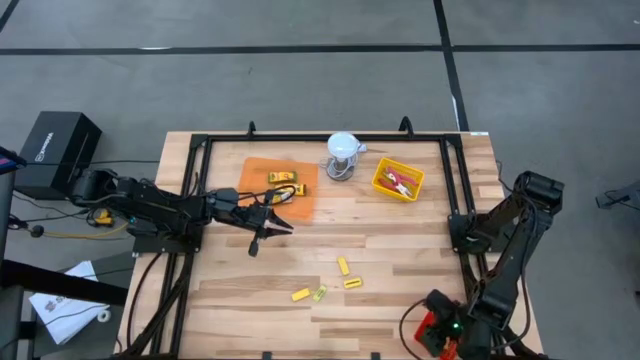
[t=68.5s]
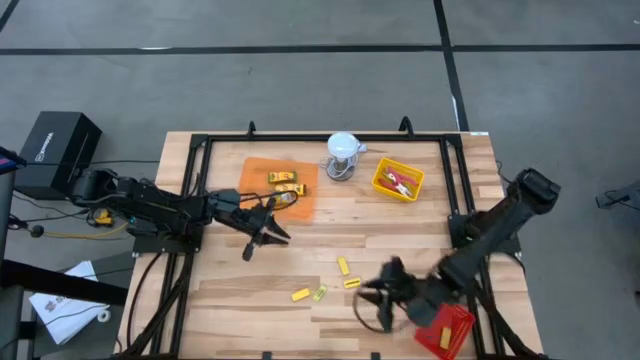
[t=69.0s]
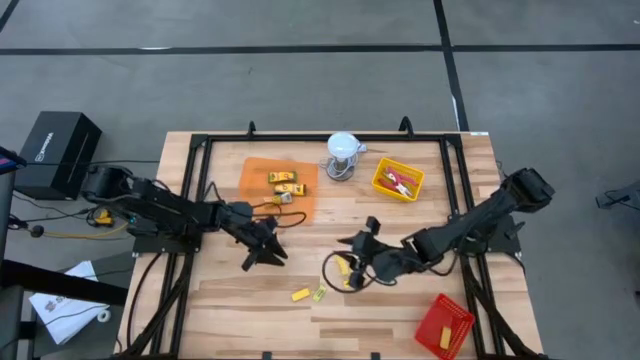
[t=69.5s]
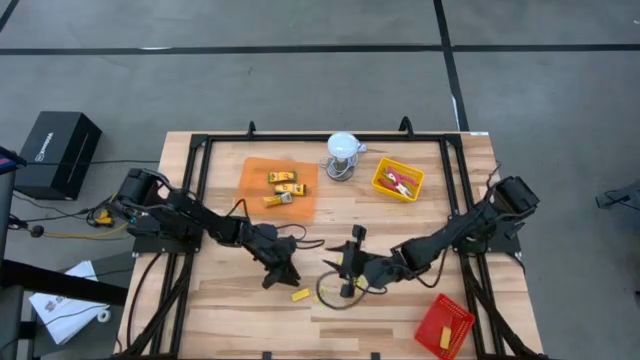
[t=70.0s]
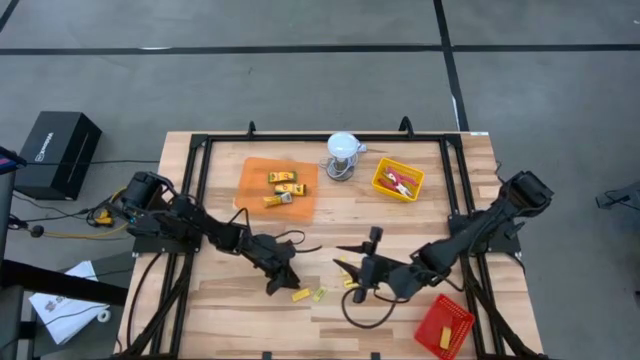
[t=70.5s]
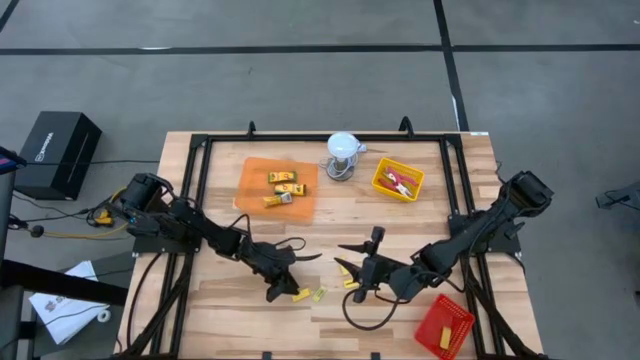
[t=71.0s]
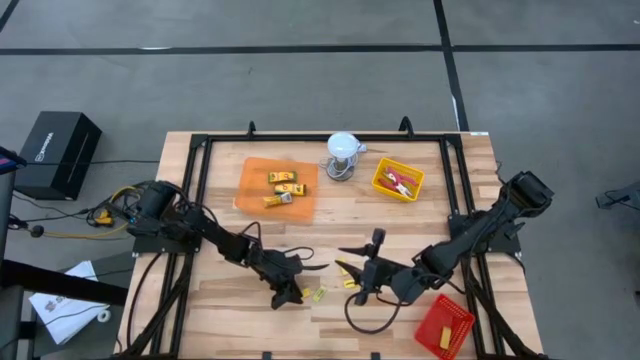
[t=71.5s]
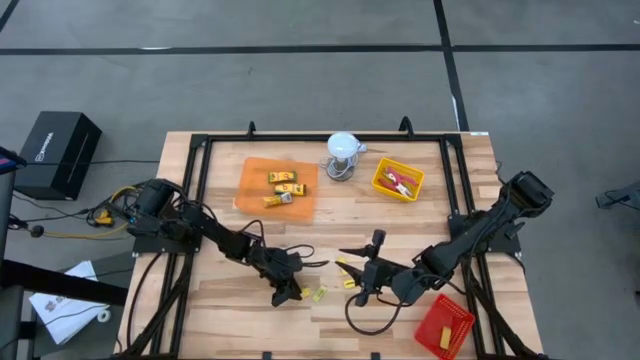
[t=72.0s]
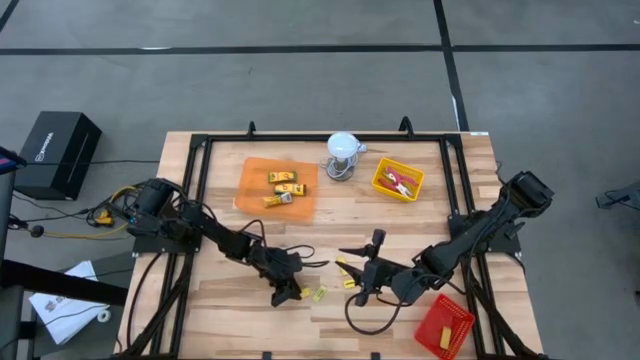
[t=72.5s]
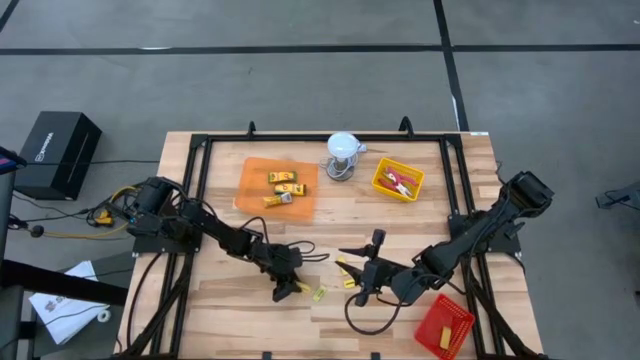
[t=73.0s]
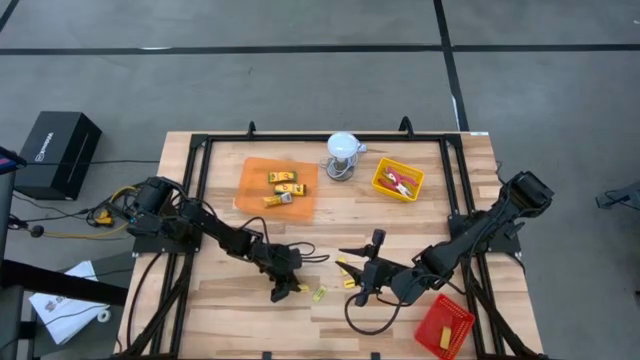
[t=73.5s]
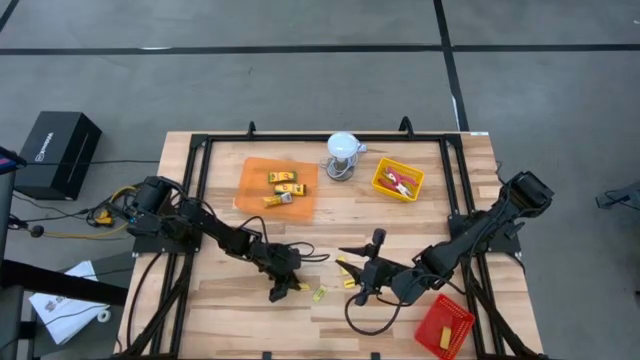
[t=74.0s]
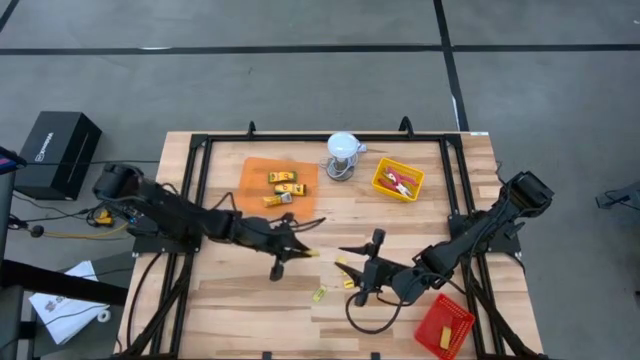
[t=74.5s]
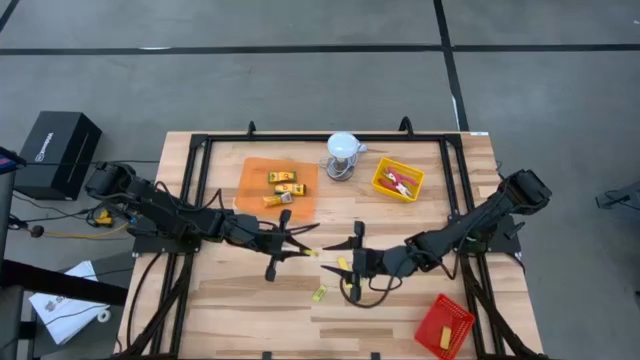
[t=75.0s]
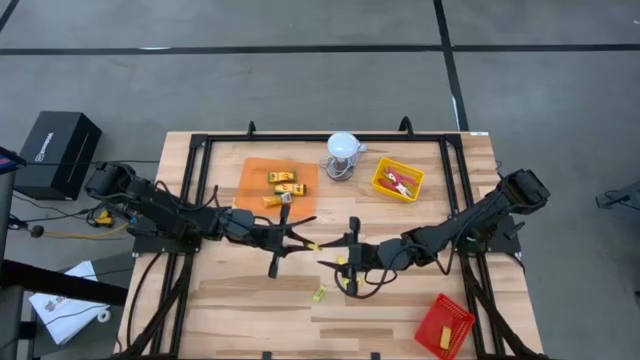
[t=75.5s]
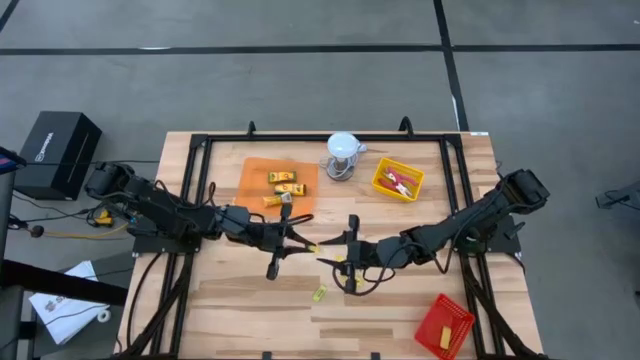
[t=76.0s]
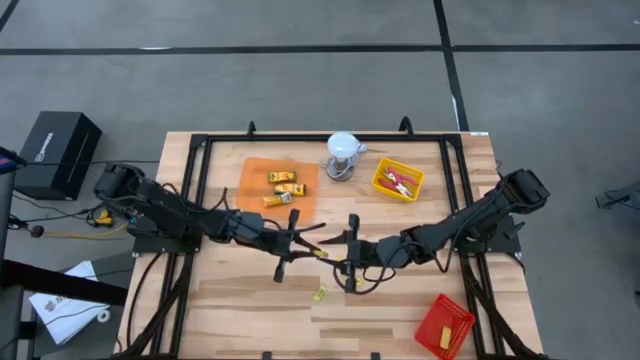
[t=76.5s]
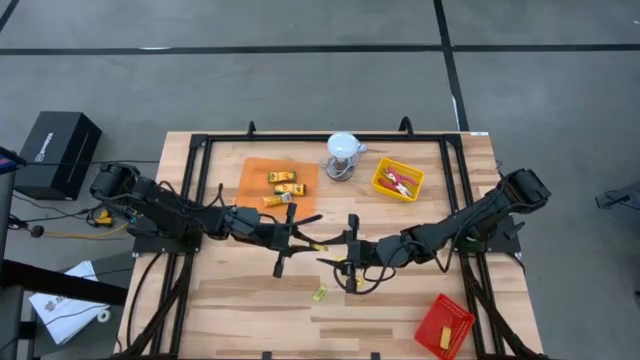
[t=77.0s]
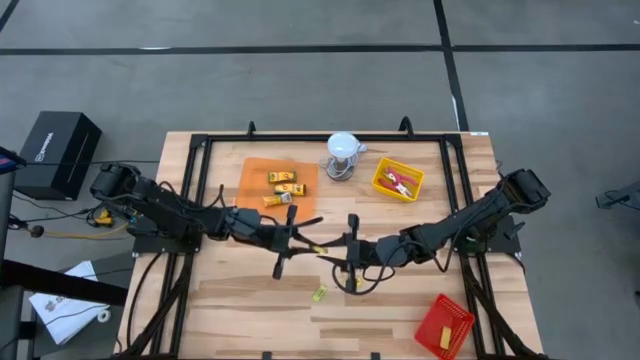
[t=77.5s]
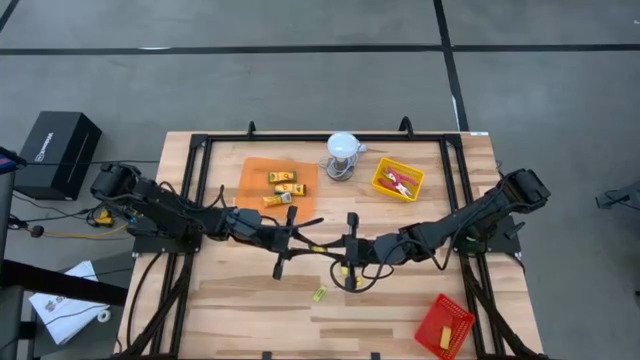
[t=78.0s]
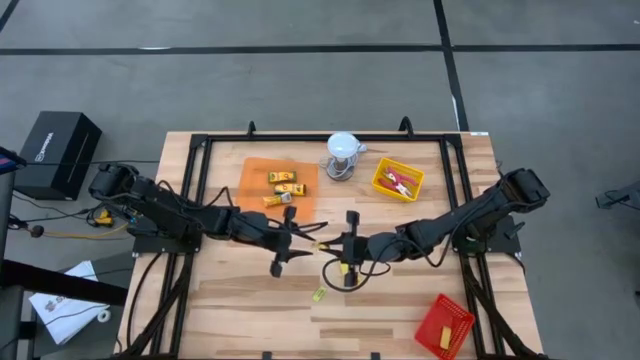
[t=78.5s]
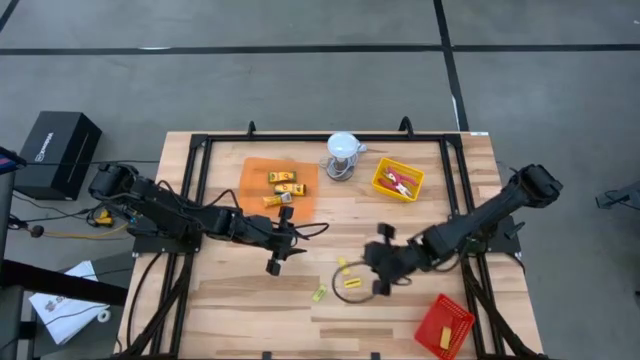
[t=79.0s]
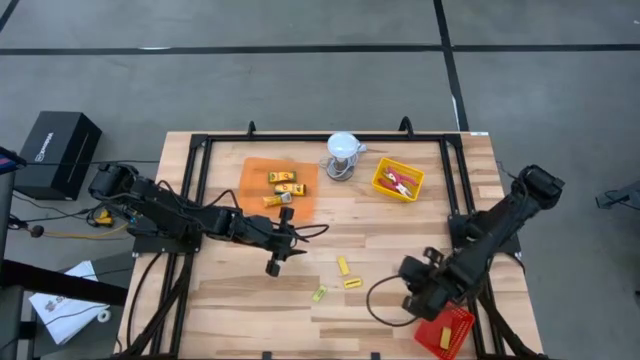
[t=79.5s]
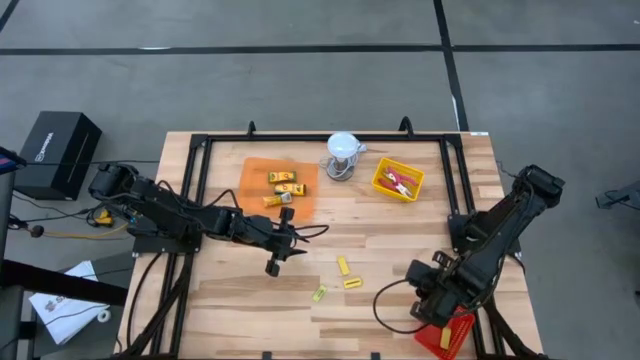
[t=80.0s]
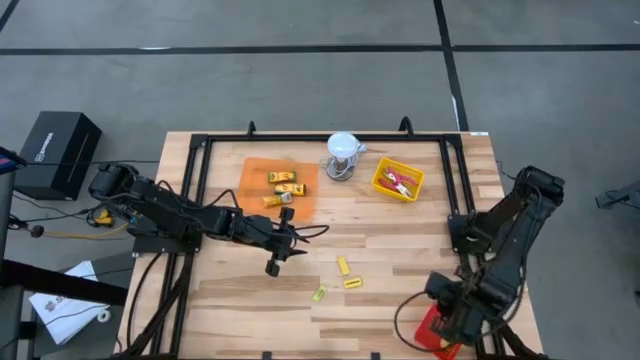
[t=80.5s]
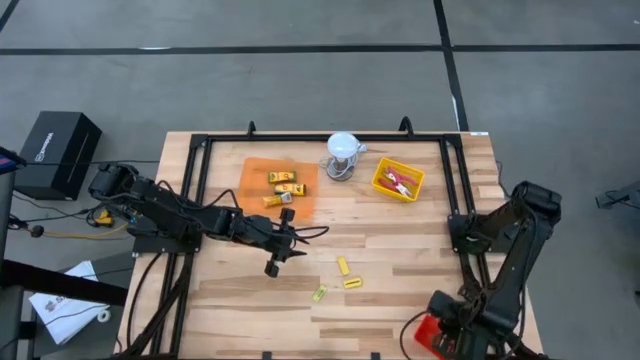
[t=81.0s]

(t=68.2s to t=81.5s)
Task: Pick & Place School Supplies
Put the yellow eraser into the red bin

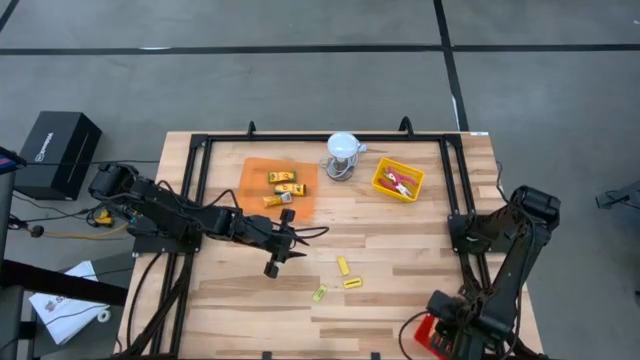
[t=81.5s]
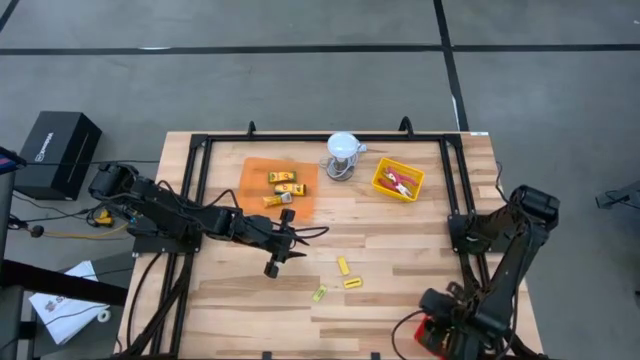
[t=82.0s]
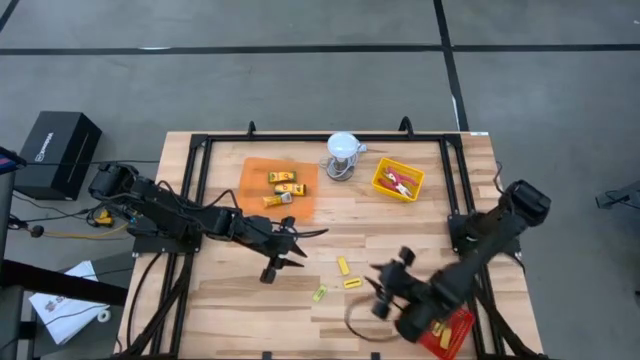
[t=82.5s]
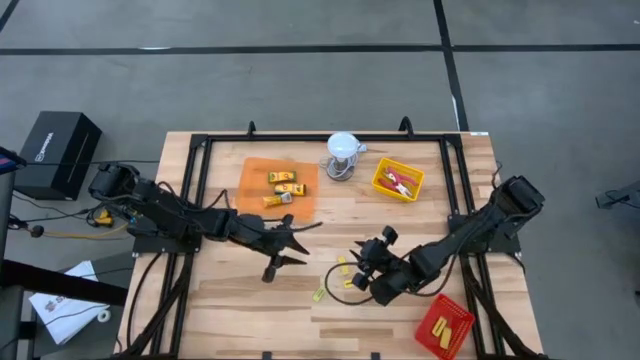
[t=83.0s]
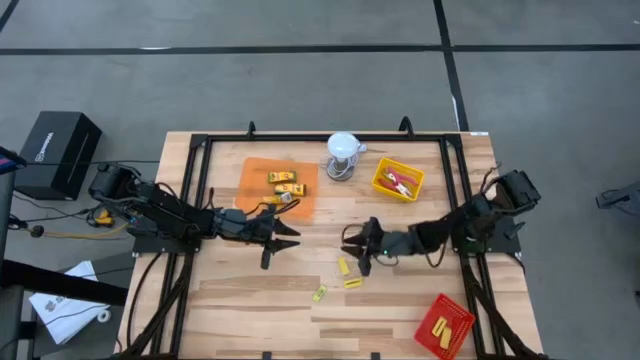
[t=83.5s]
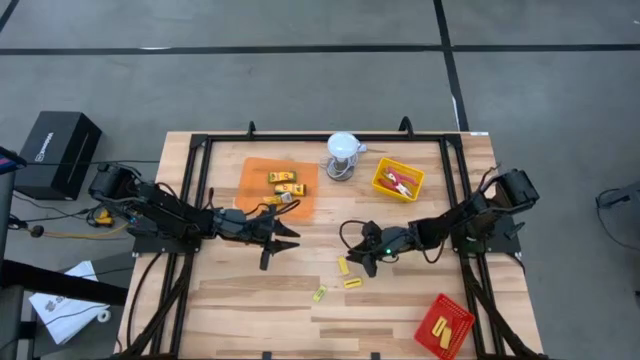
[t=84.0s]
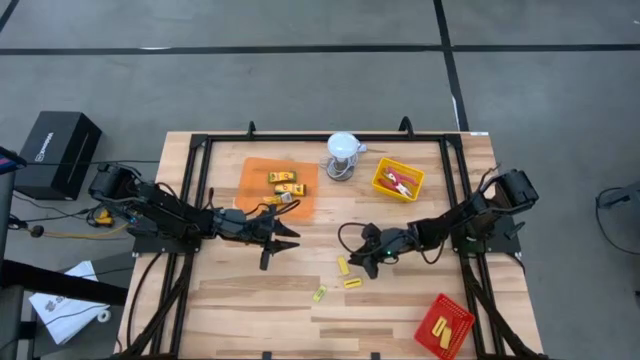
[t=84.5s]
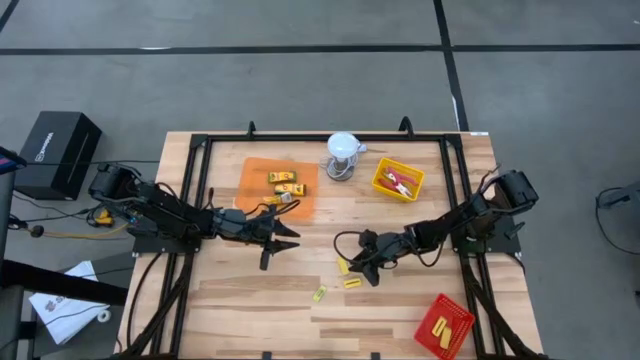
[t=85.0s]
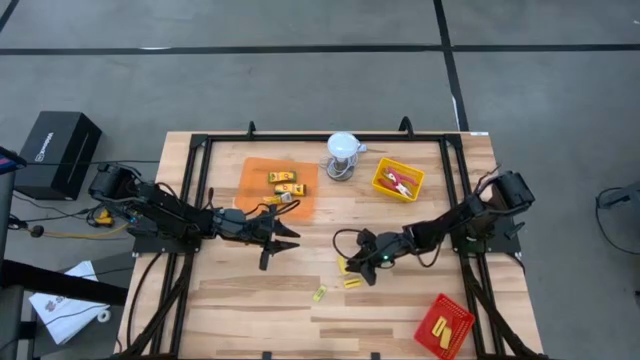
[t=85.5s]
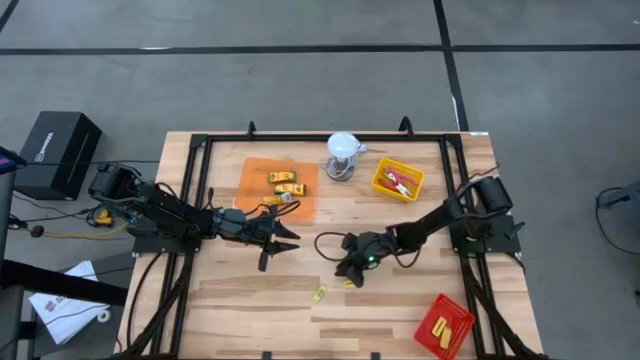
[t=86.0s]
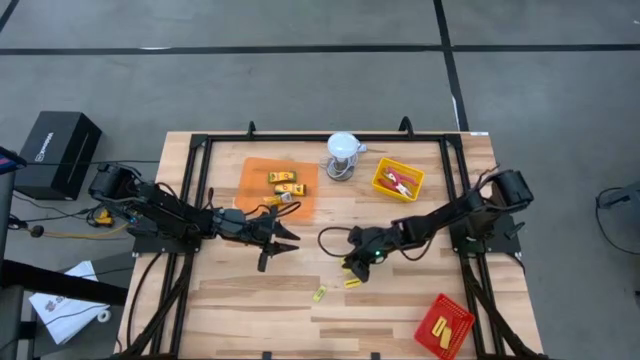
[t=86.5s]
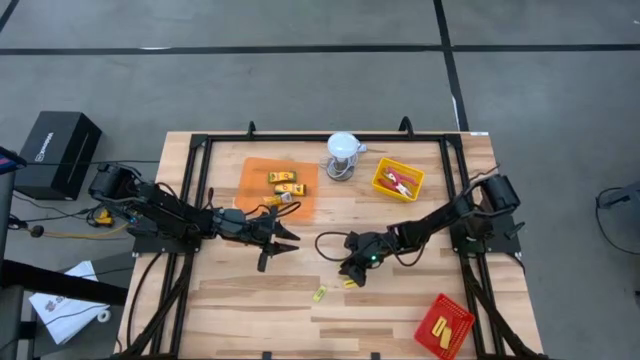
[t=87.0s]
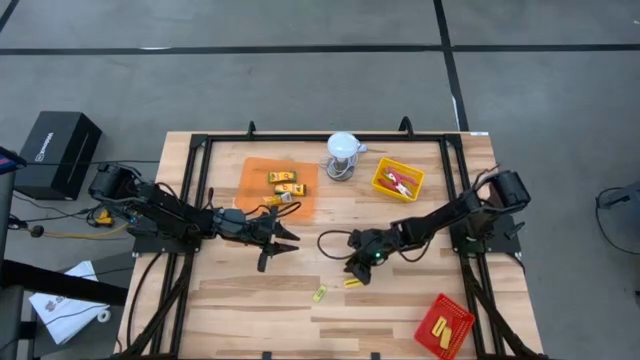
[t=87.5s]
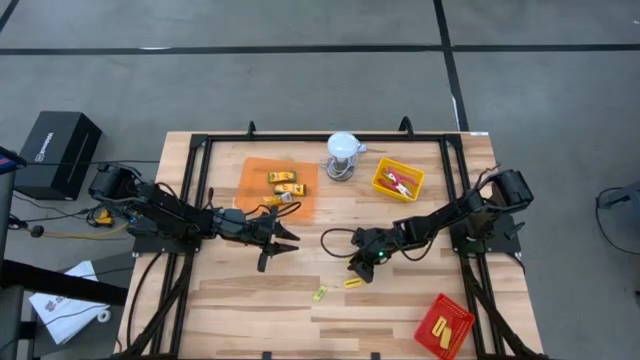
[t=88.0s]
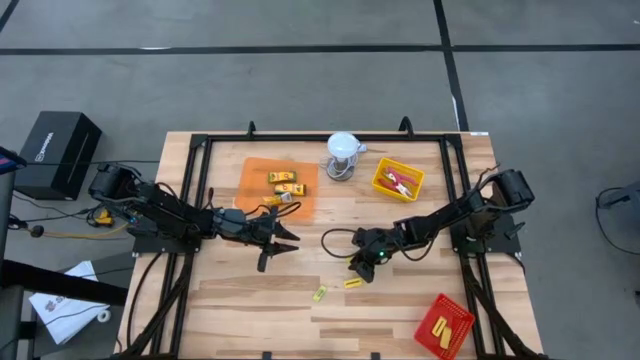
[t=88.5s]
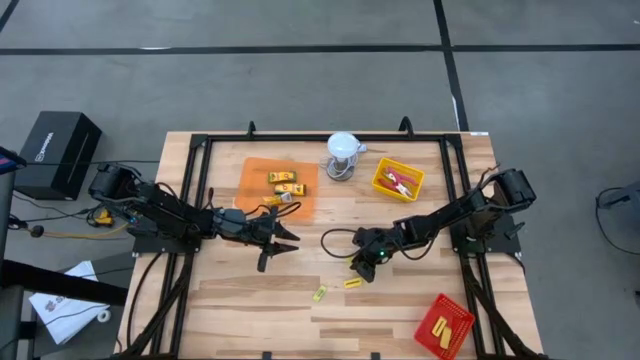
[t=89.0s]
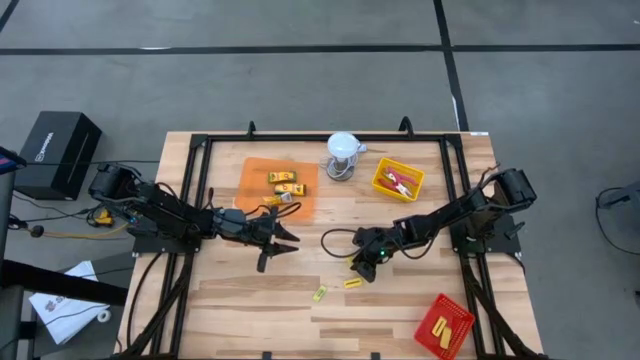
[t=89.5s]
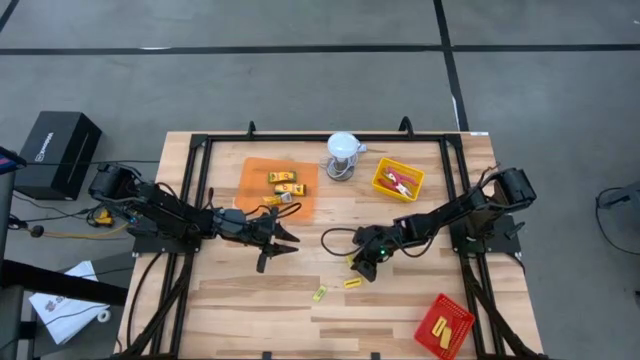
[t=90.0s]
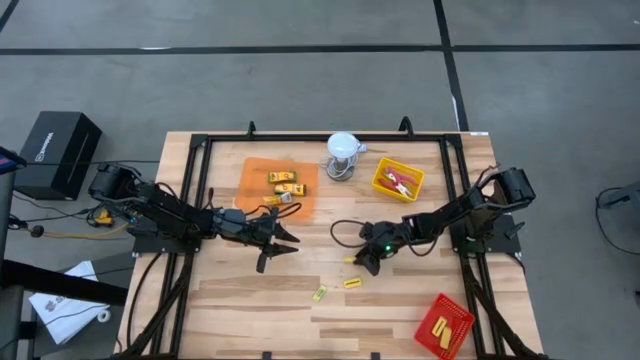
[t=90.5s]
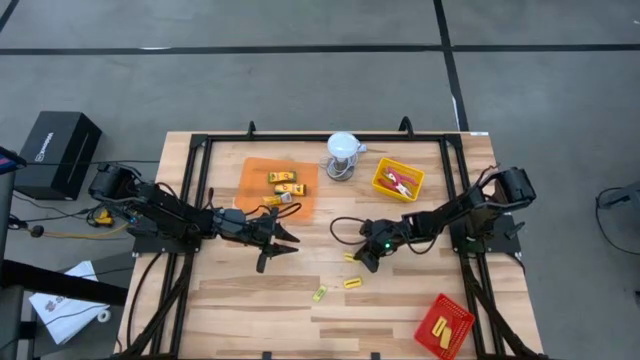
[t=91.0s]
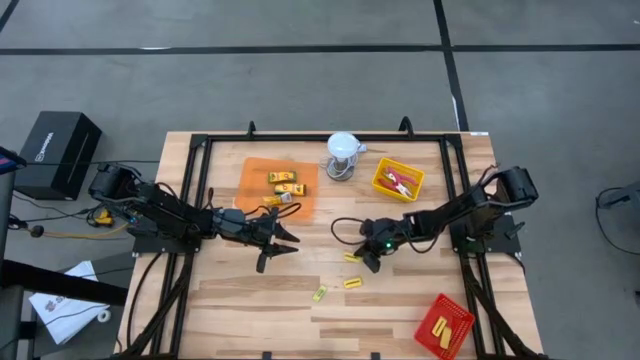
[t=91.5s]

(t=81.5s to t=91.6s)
Put the yellow eraser into the red bin
